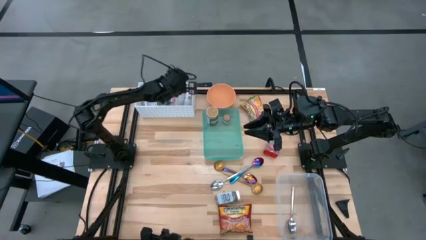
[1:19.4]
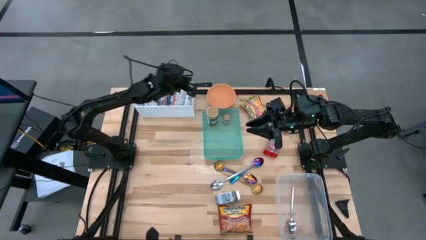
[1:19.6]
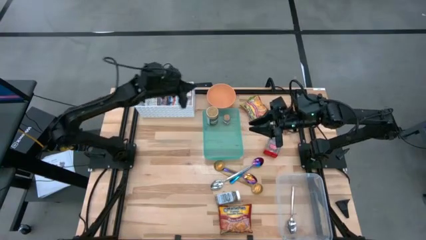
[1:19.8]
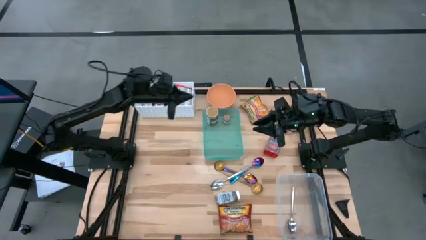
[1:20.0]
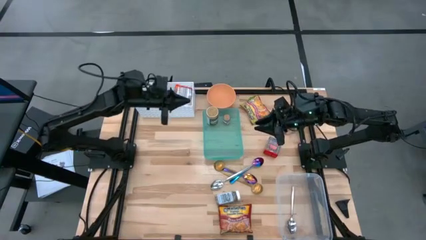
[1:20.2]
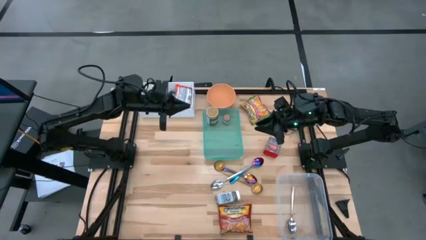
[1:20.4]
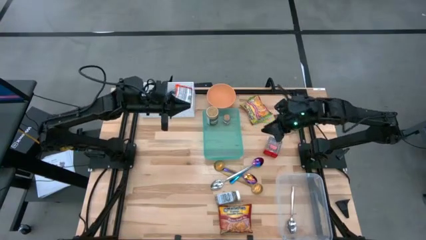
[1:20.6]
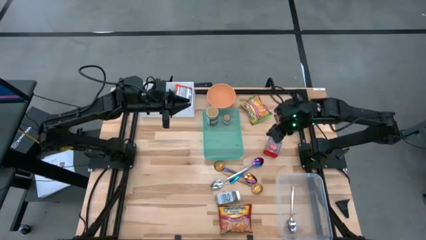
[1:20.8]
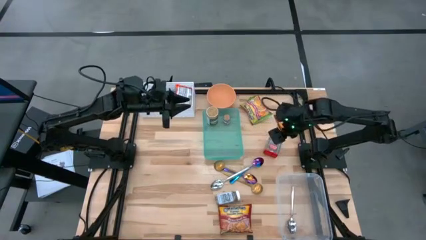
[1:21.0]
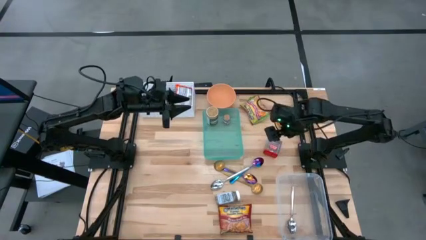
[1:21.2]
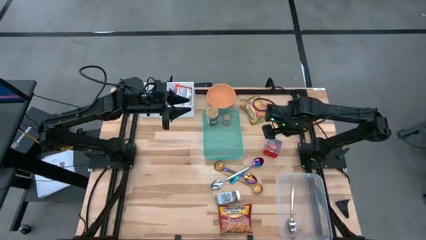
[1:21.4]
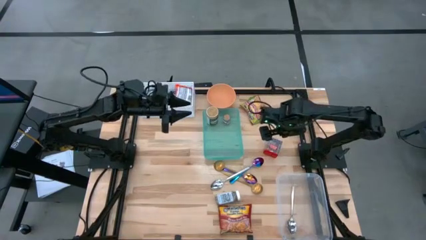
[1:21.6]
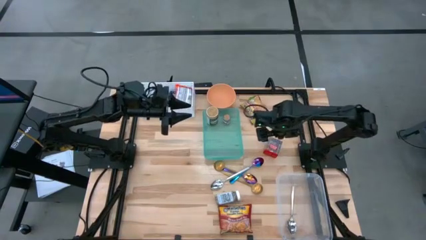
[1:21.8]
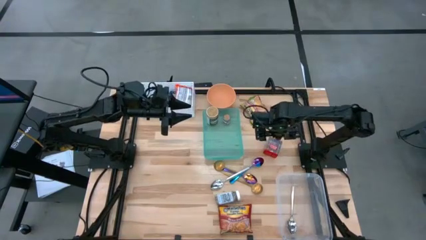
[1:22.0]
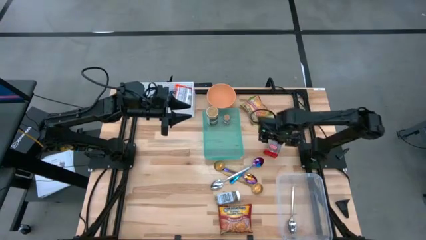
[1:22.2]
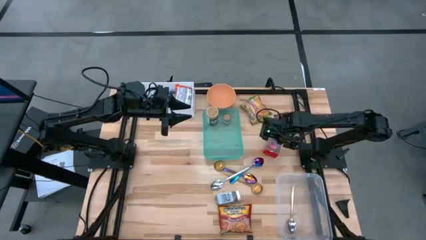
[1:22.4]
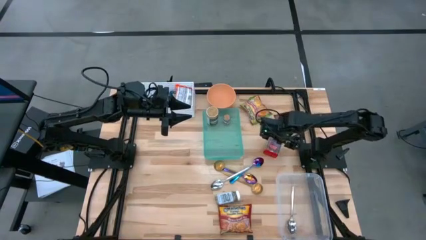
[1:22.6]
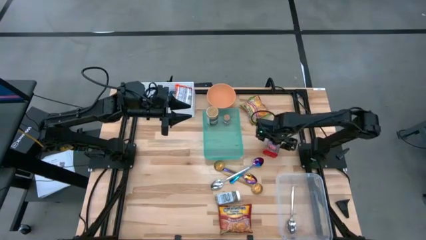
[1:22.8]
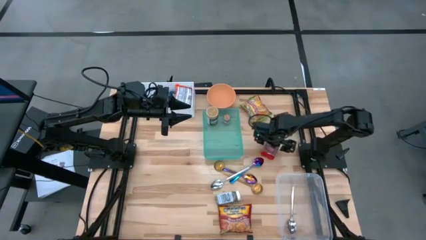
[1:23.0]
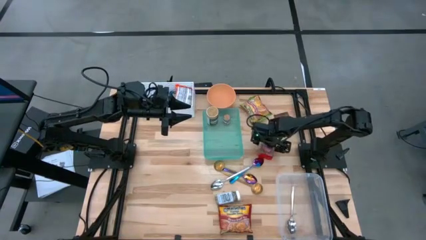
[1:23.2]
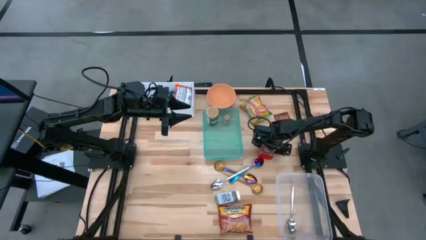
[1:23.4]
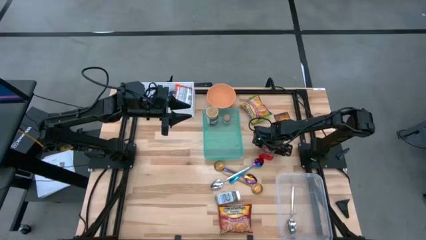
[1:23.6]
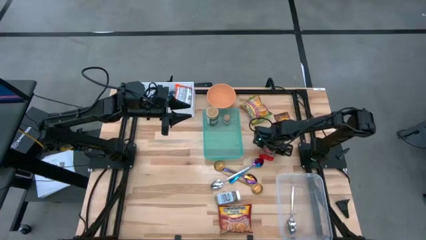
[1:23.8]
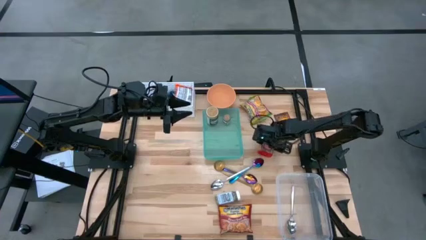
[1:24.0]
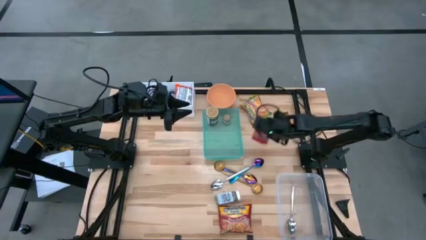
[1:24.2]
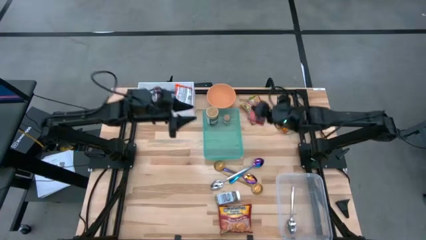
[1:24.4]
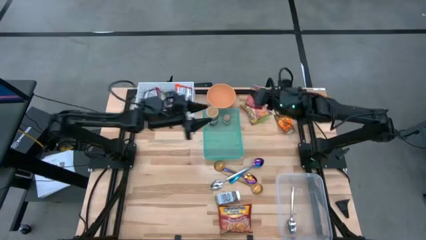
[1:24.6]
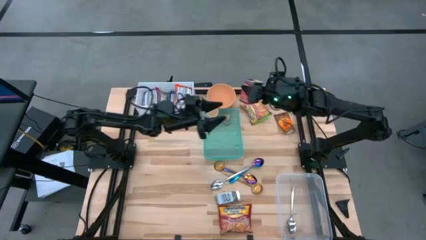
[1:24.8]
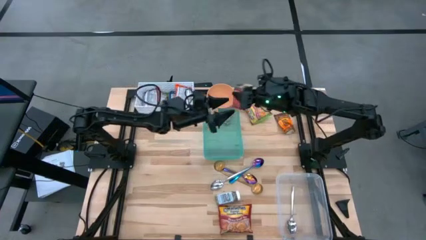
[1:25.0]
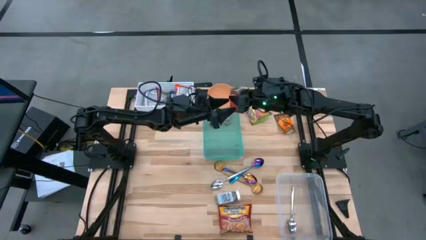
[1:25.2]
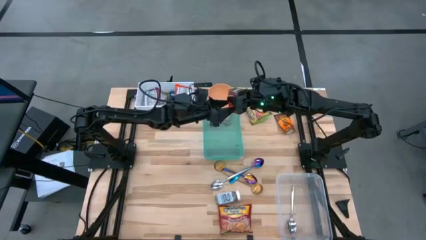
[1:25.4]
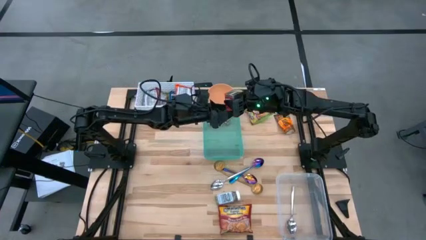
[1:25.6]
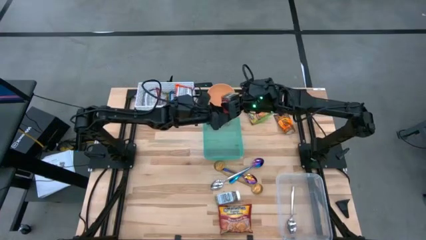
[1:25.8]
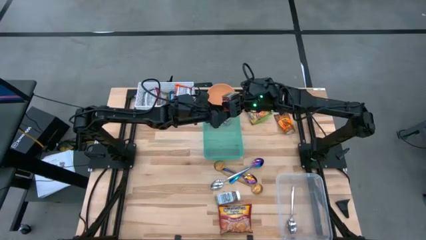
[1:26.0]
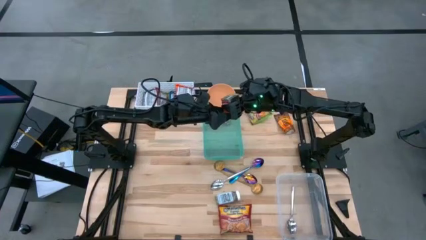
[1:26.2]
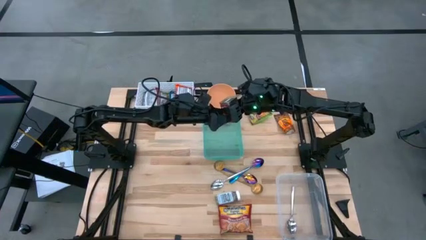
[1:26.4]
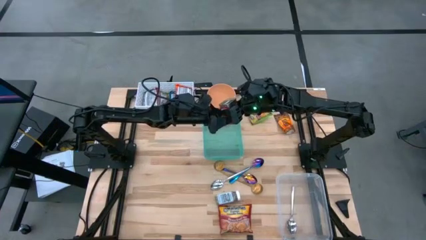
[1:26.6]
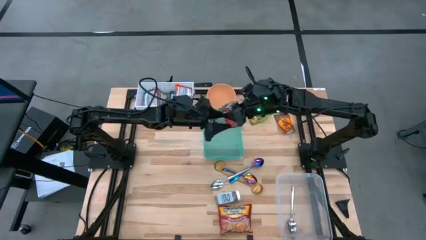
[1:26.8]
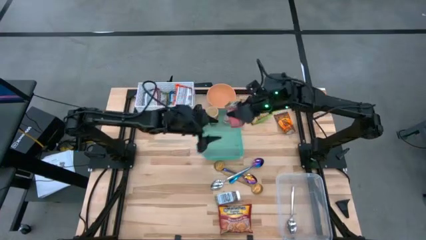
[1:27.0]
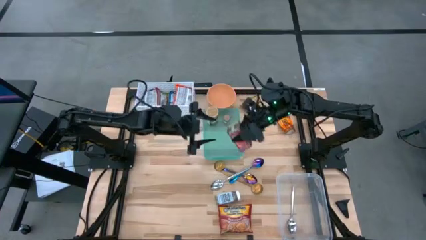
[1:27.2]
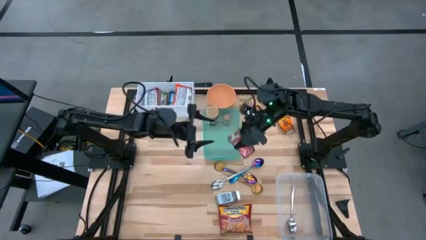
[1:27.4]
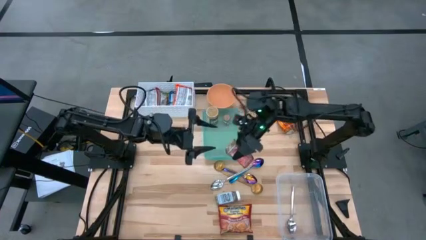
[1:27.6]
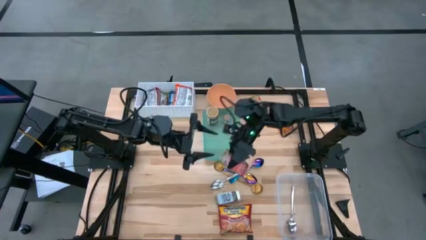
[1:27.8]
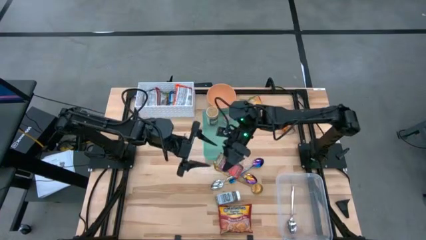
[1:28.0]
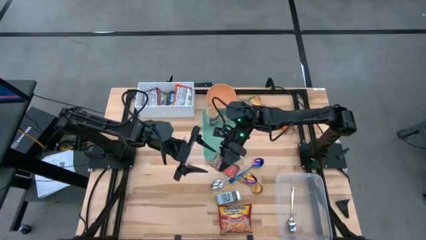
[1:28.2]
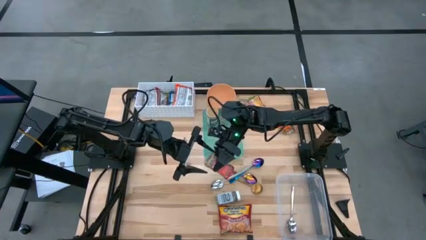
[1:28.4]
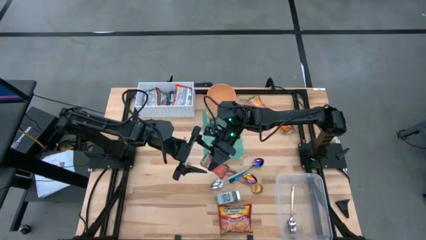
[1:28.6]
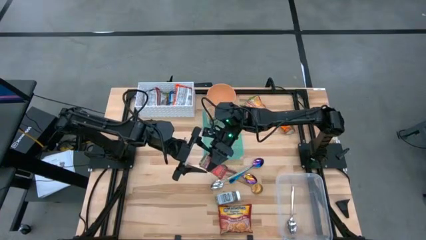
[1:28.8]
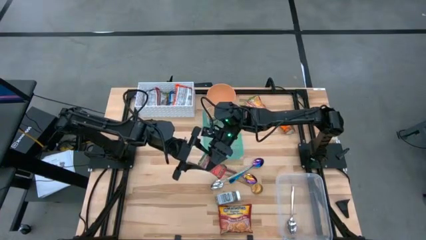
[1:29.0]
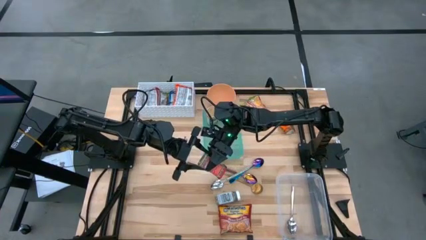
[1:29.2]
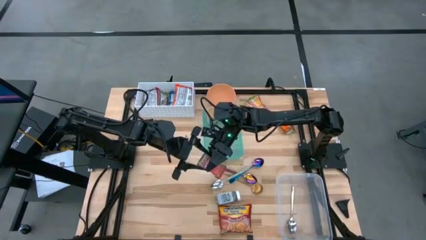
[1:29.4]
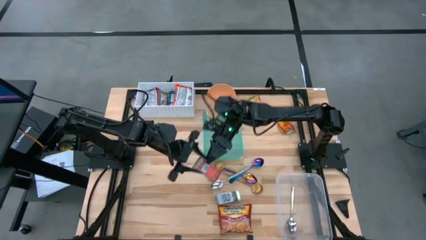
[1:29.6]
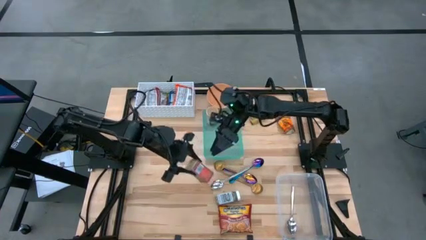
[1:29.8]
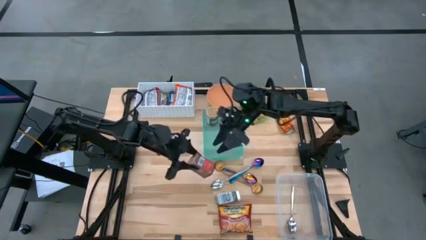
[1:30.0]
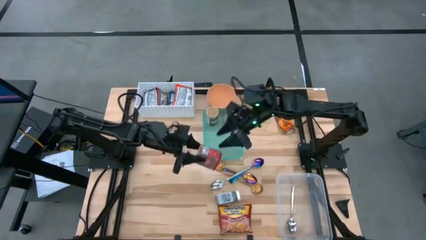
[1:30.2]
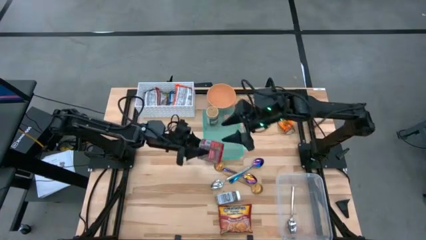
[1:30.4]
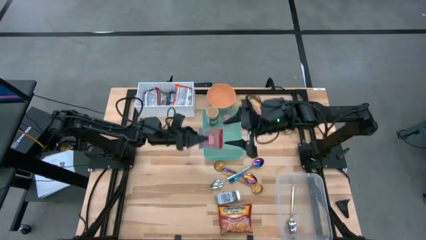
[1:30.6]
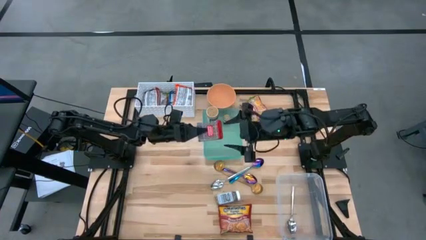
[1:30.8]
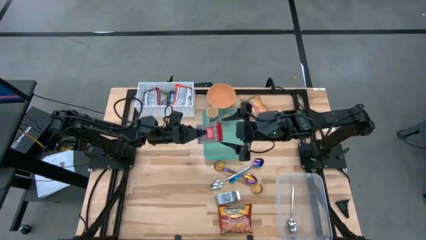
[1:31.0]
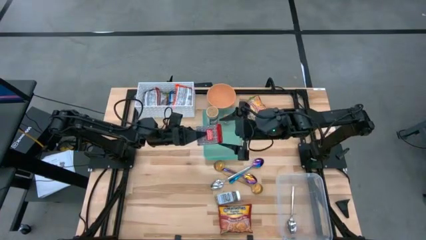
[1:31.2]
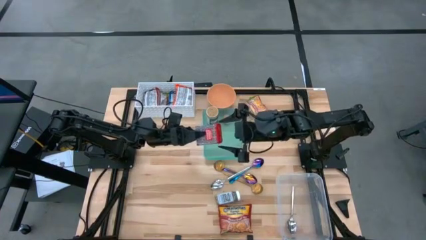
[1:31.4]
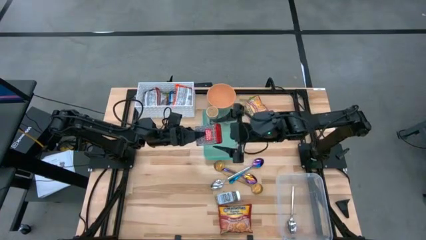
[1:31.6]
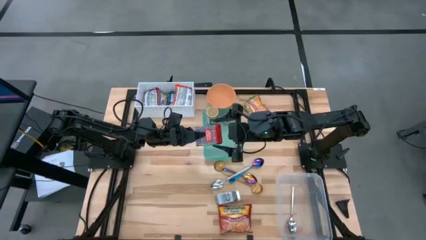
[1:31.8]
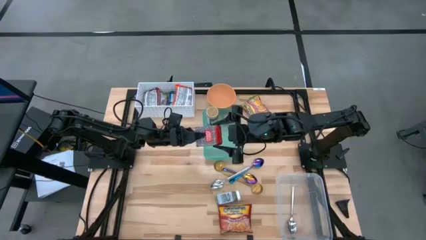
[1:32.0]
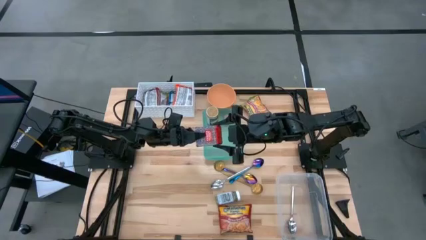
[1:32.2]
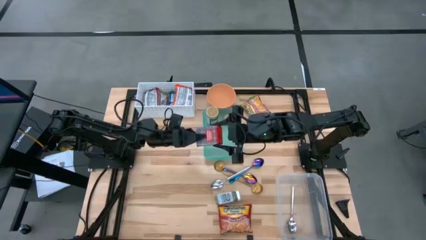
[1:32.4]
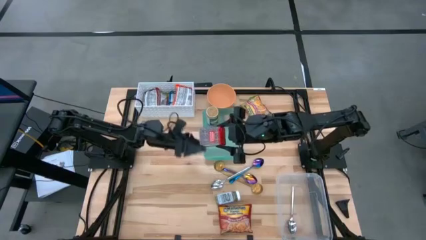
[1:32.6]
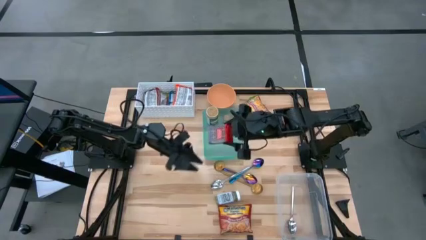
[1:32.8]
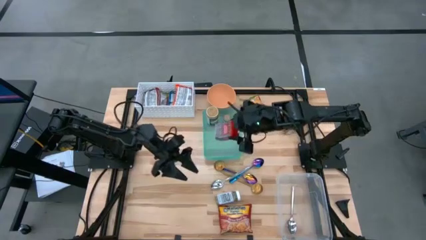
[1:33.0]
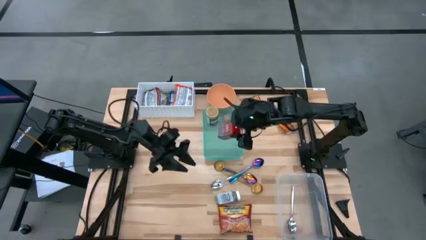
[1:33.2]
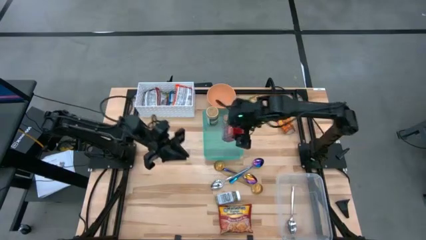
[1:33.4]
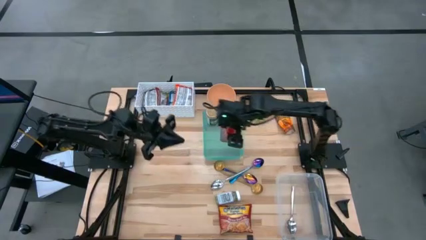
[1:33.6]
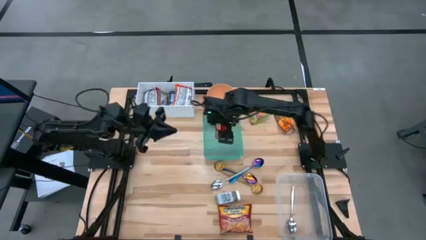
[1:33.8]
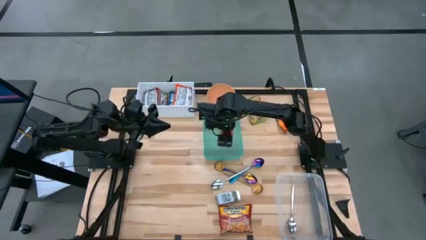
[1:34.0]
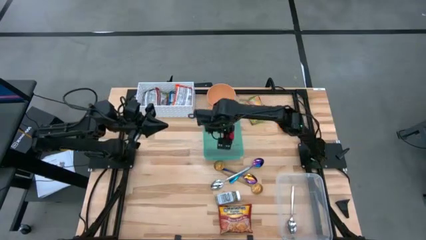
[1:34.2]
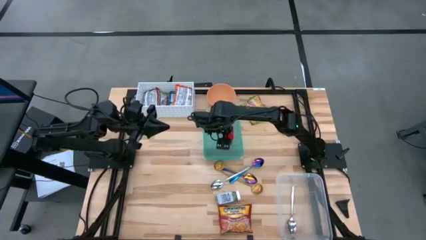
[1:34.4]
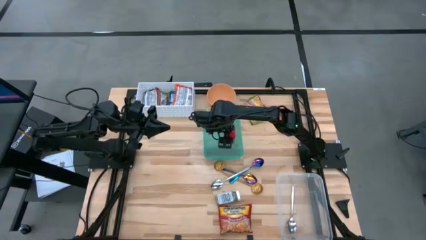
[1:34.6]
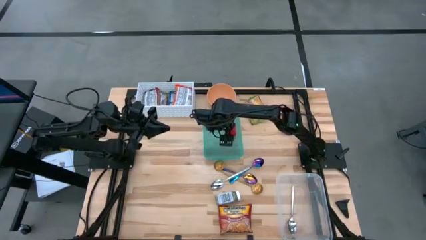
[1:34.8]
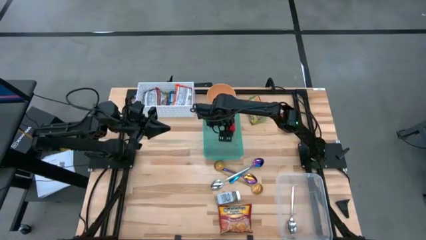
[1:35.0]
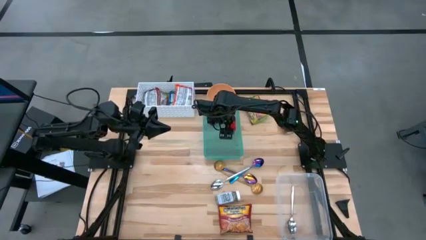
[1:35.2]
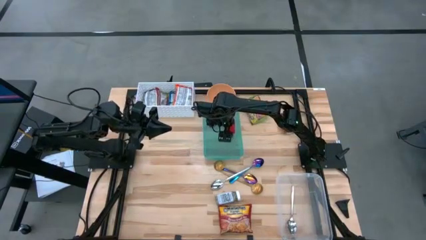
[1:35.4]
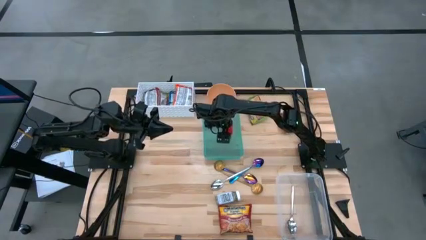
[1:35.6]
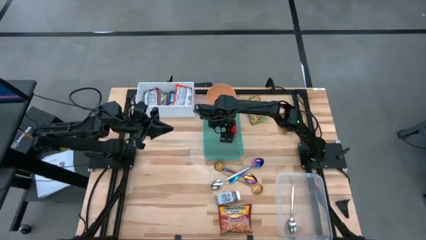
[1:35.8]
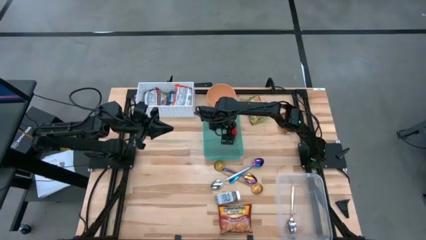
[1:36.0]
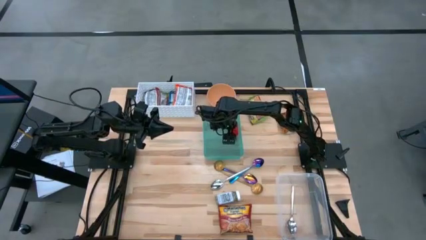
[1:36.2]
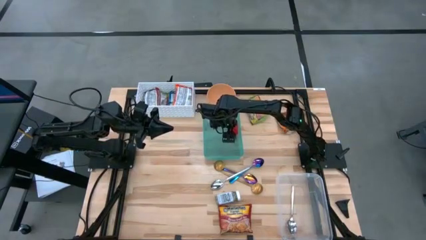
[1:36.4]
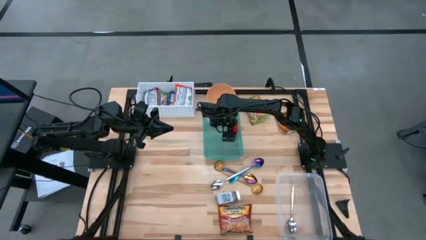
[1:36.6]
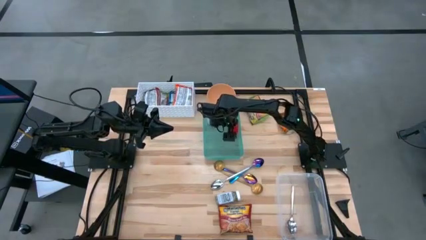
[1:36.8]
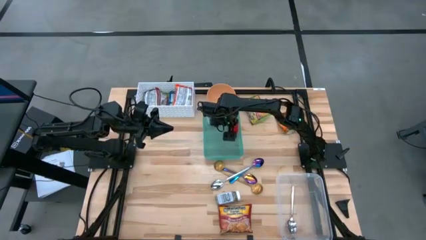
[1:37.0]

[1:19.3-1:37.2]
Task: Pick & Place Food Item
Put the red seasoning into the blue bin
